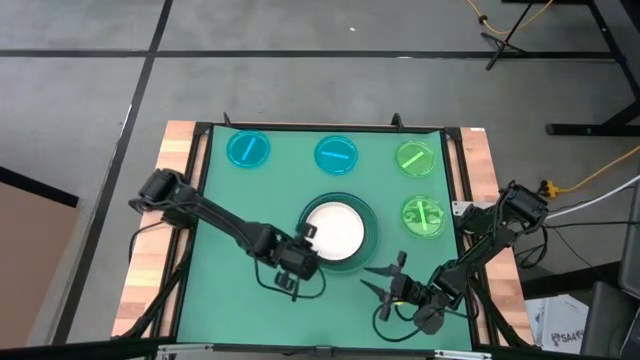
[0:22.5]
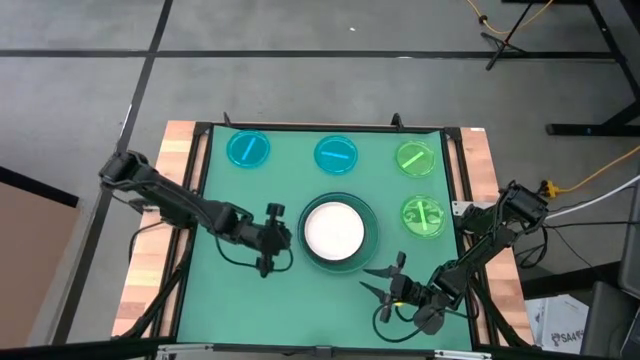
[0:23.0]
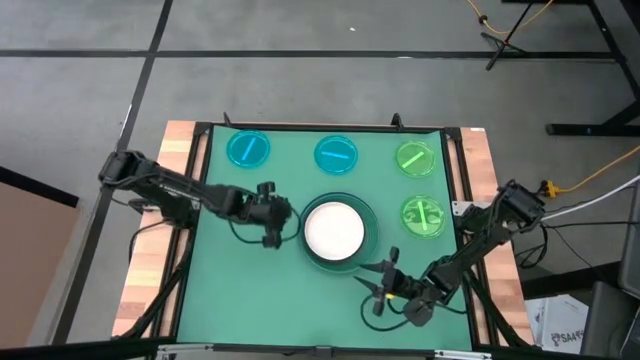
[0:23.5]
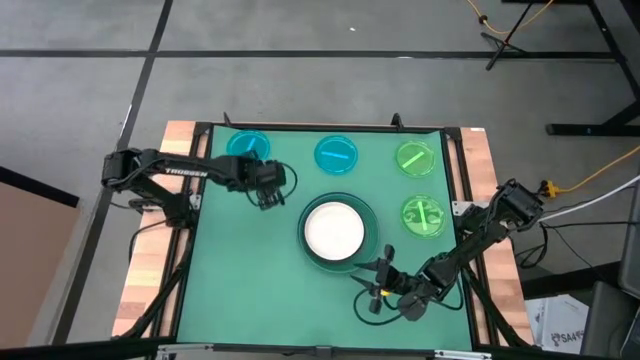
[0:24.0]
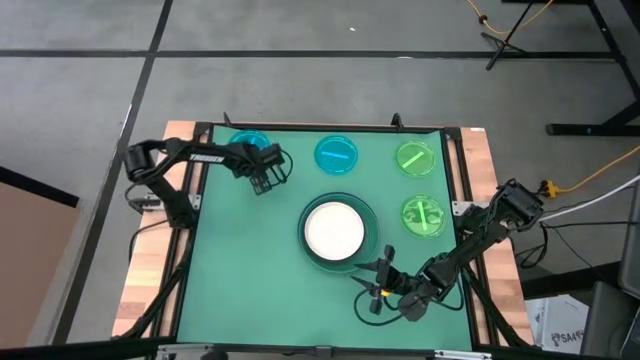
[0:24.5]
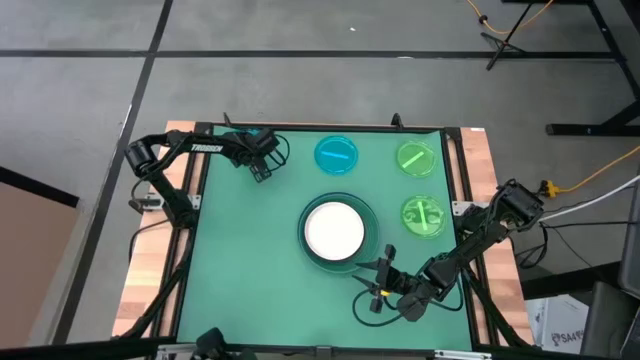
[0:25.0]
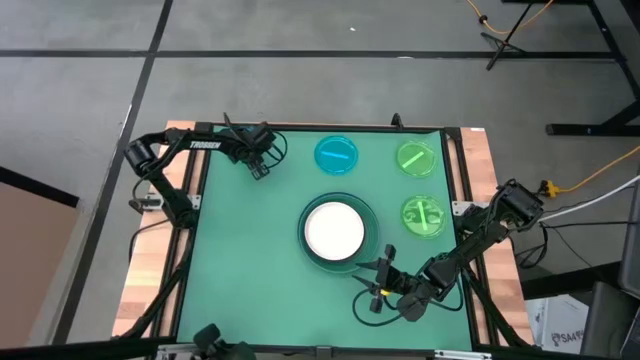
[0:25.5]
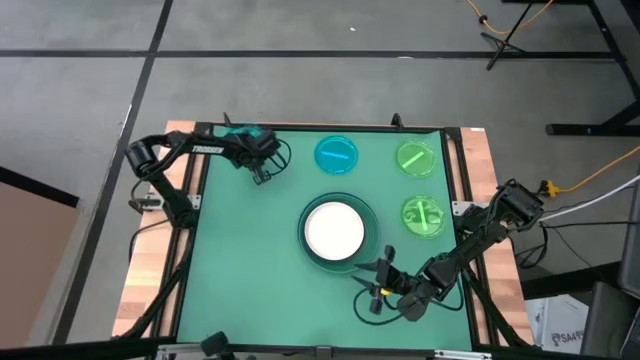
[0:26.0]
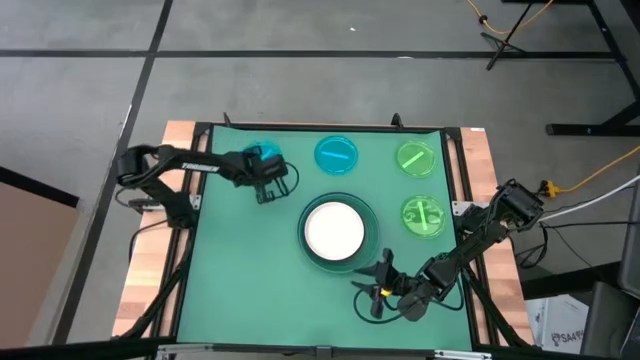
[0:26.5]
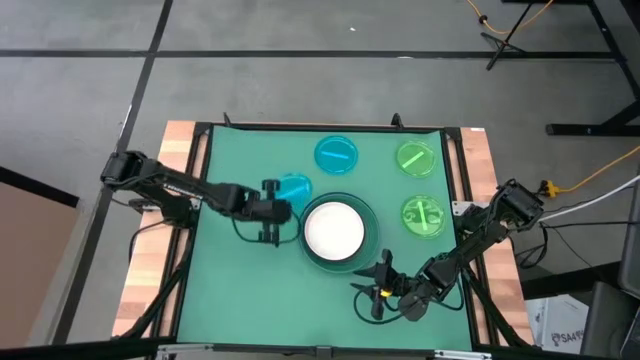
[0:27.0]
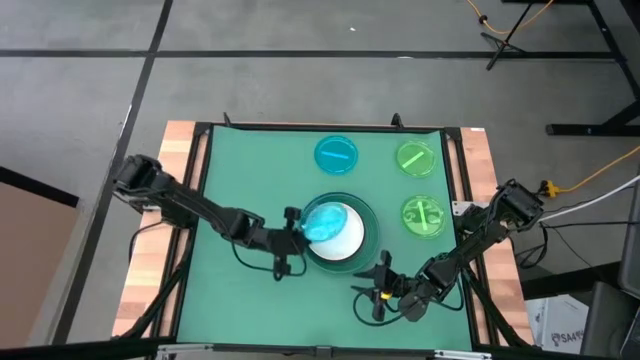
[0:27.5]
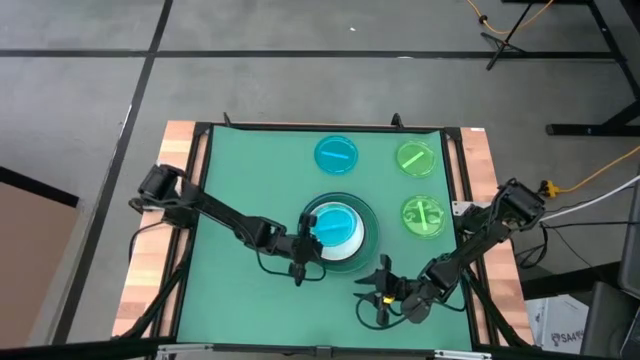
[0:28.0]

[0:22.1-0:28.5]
Task: Stack plastic plates
Stack the left blue transparent plate on top of the white plate

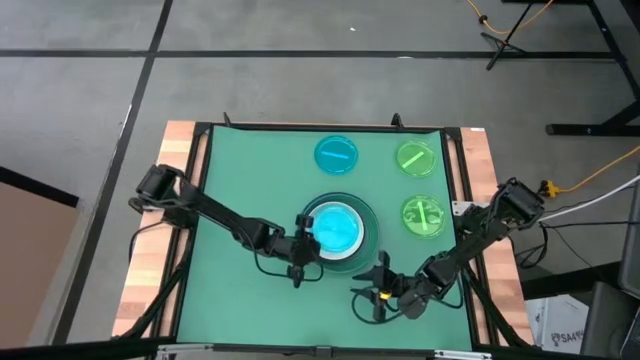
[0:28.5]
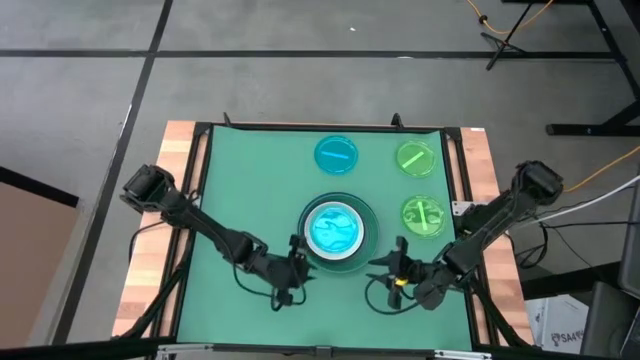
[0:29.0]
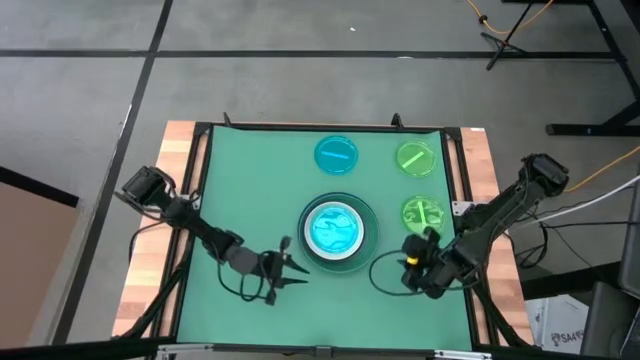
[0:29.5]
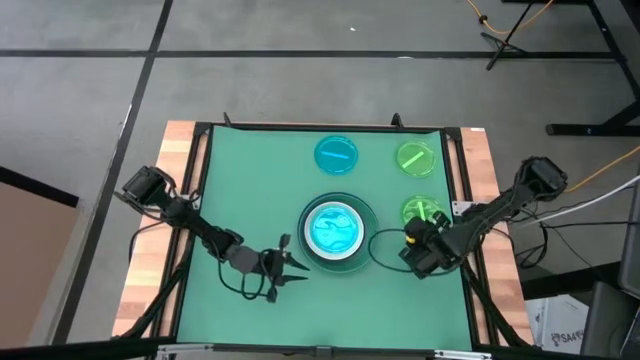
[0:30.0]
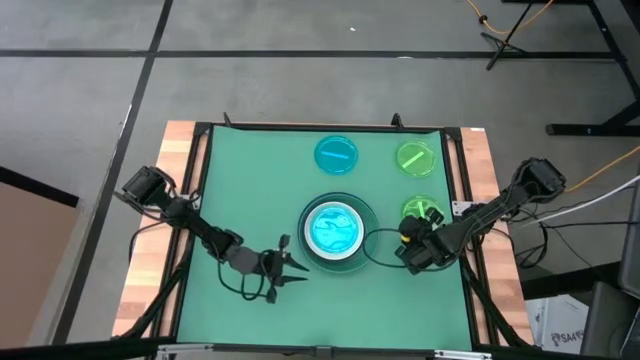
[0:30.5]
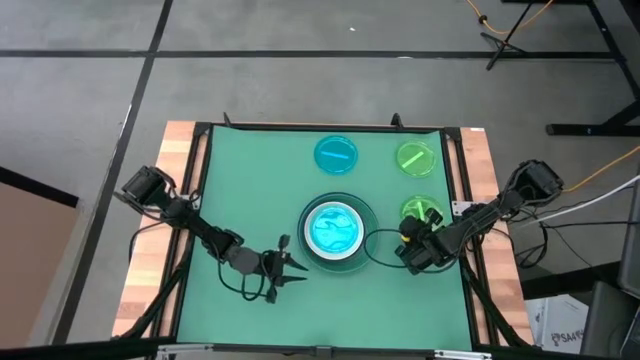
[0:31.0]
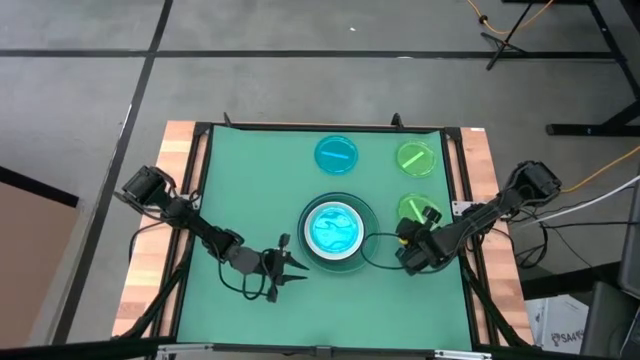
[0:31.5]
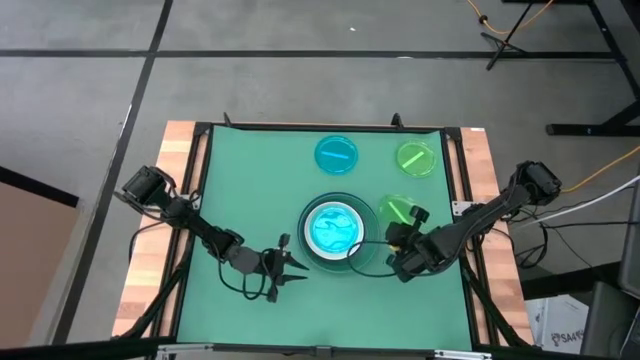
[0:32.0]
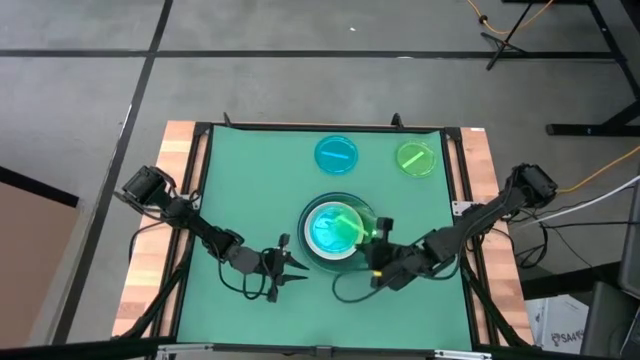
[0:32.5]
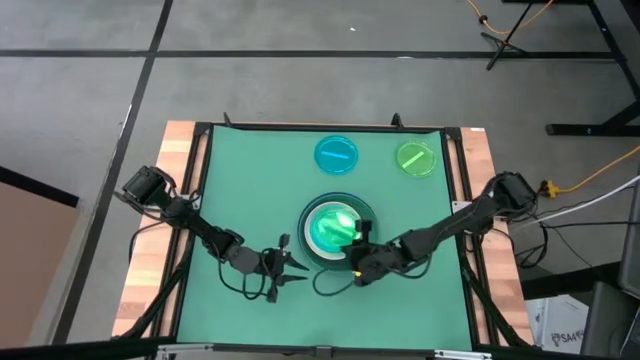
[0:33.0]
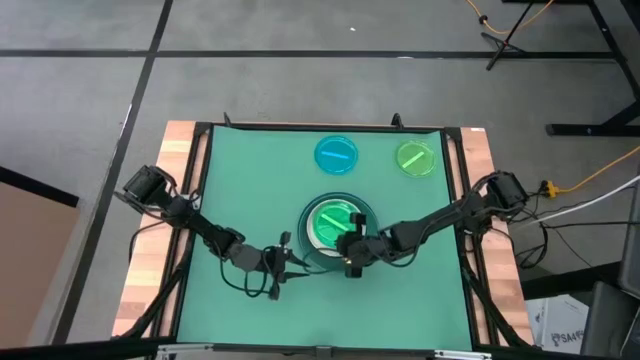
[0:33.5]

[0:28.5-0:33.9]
Stack the bottom green transparent plate on top of the green transparent plate

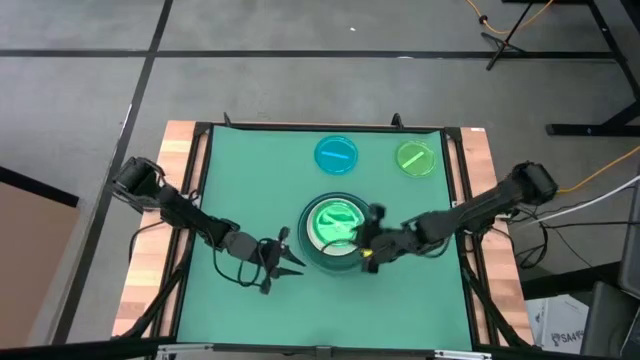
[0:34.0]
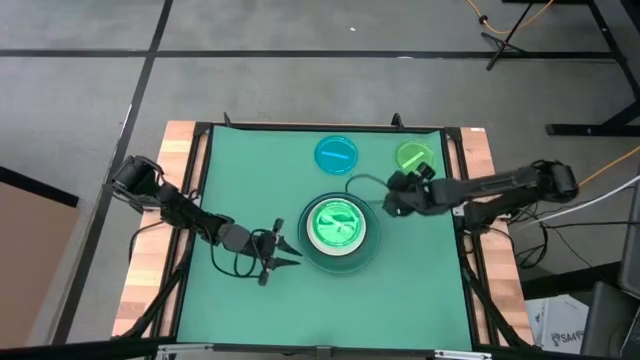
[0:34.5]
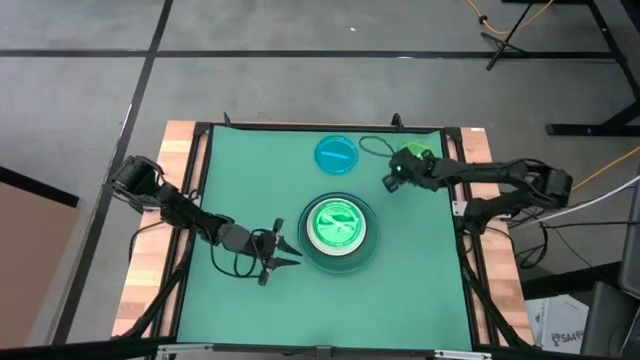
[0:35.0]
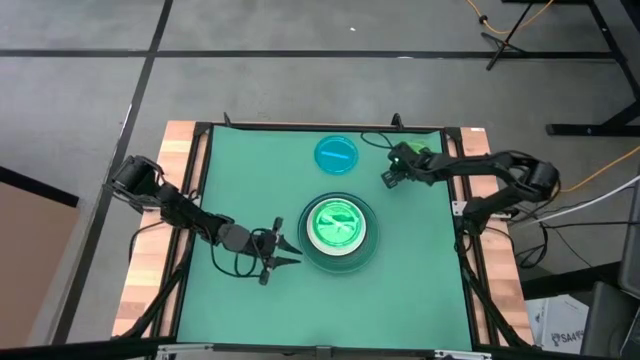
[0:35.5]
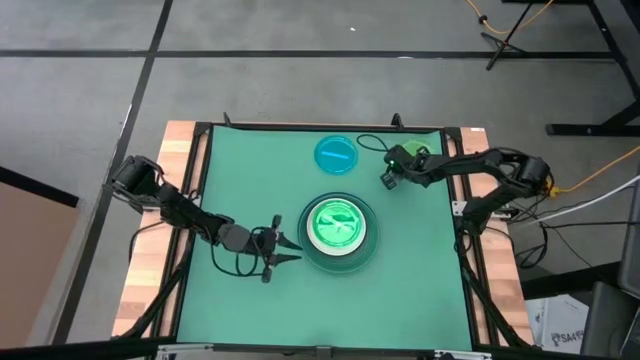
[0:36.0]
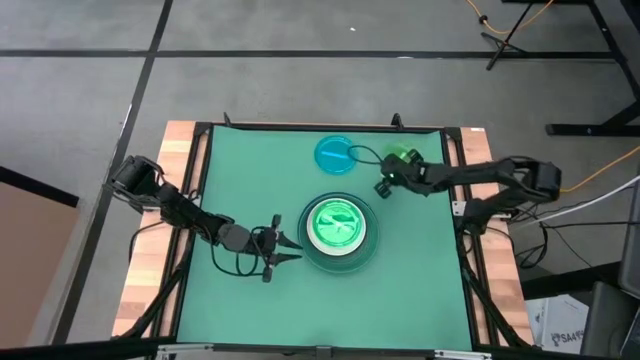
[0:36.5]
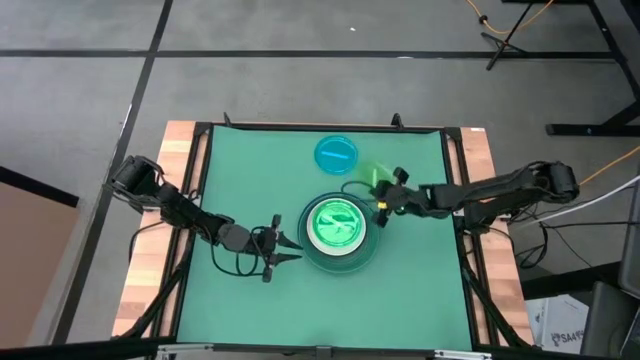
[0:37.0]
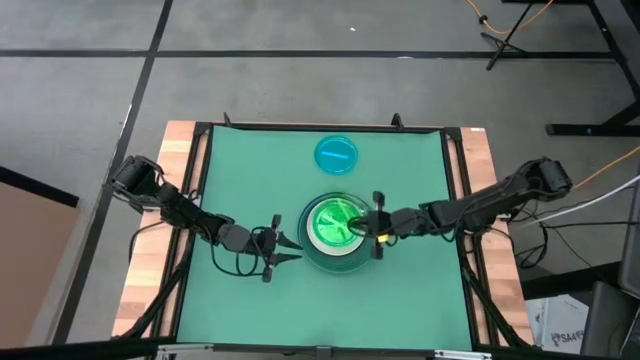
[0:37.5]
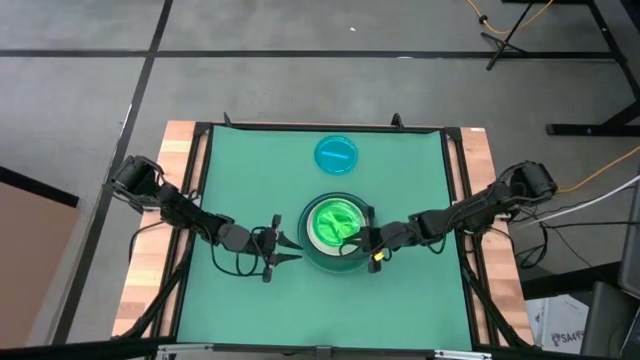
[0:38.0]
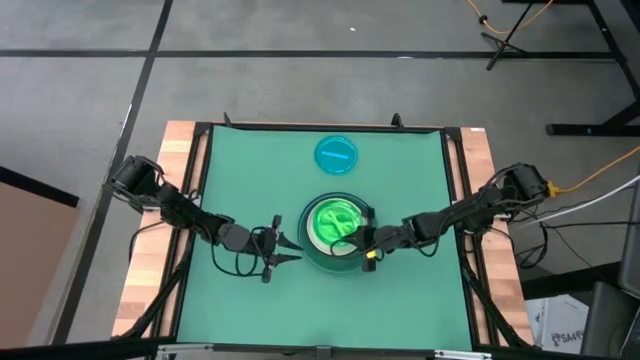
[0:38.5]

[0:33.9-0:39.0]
Stack the green transparent plate on top of the green transparent plate

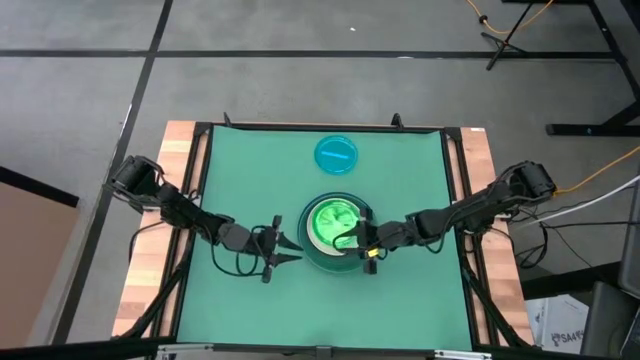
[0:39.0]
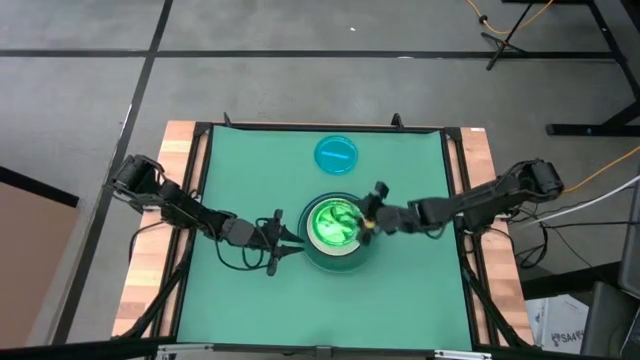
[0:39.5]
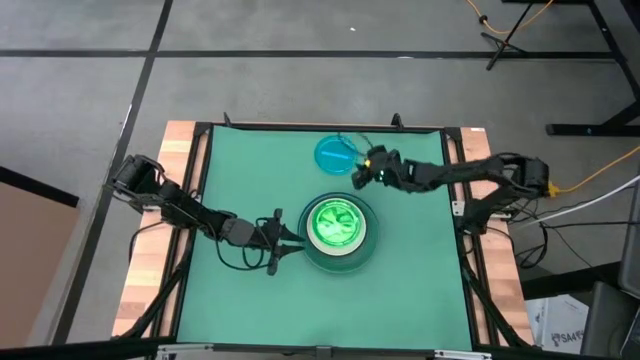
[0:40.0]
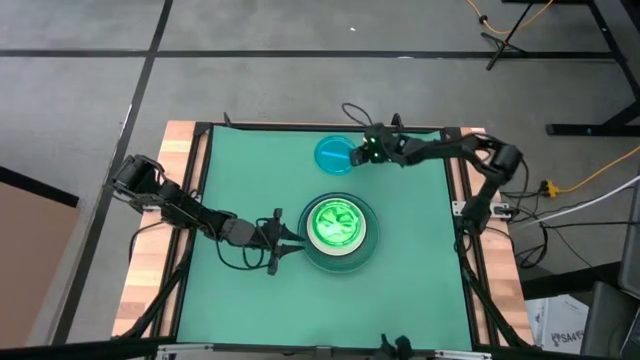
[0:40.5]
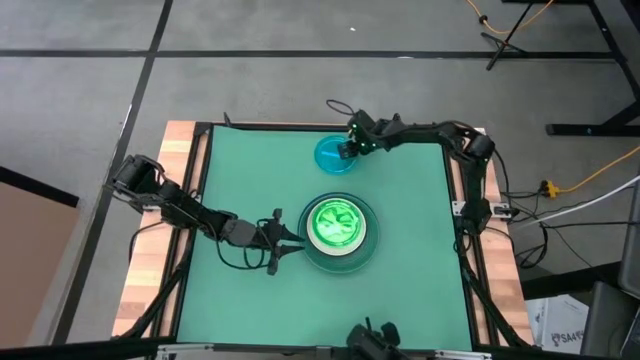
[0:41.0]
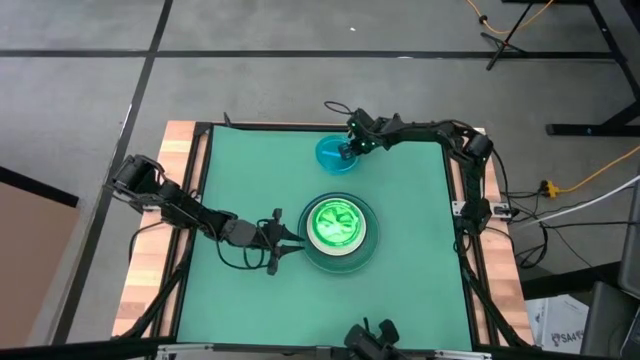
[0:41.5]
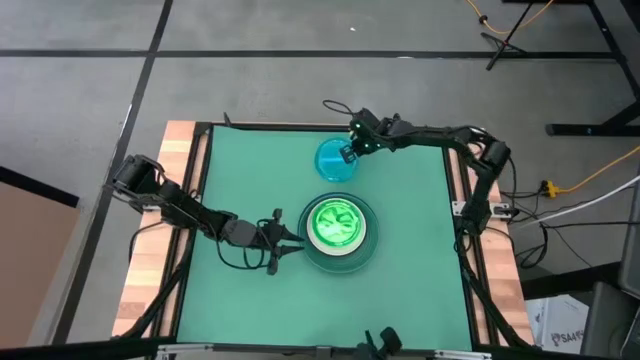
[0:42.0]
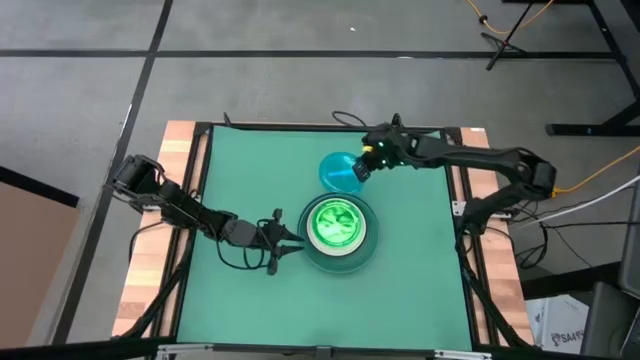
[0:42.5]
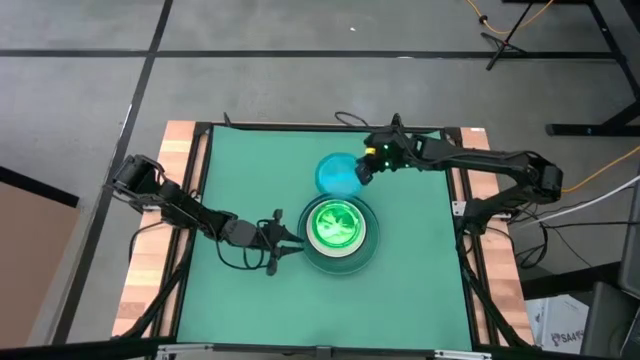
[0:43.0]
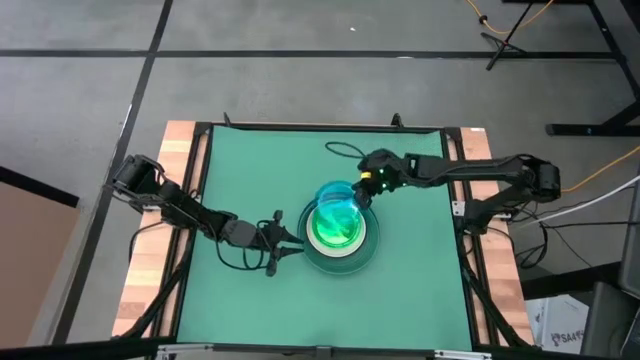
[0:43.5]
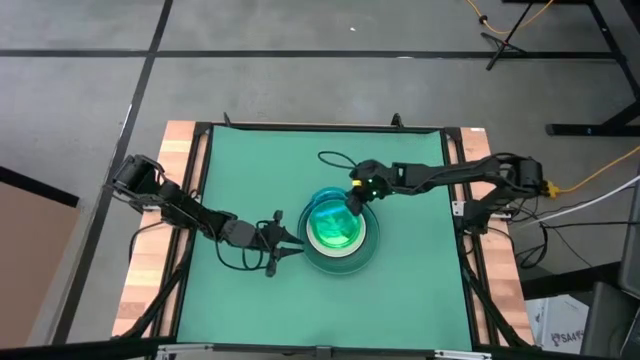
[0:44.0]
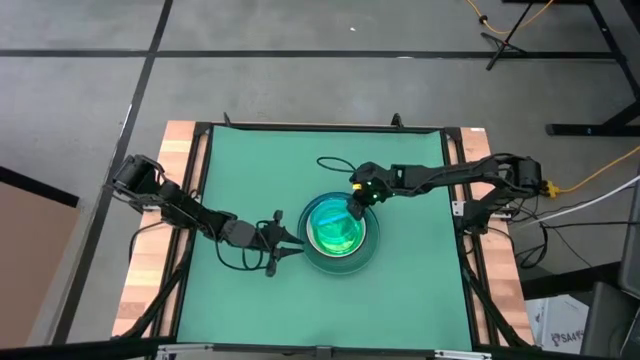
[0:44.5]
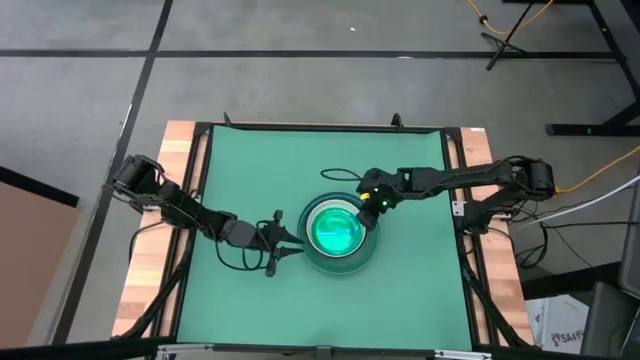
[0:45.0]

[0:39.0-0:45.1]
Stack the blue transparent plate on top of the green transparent plate
